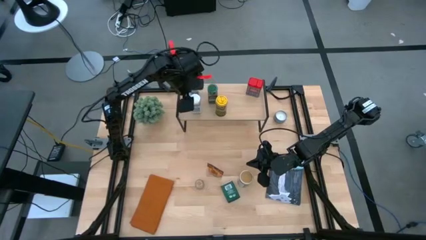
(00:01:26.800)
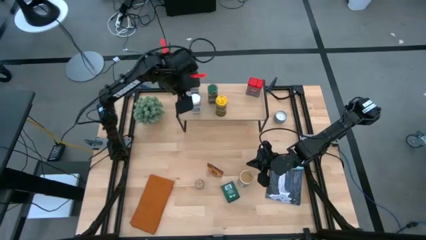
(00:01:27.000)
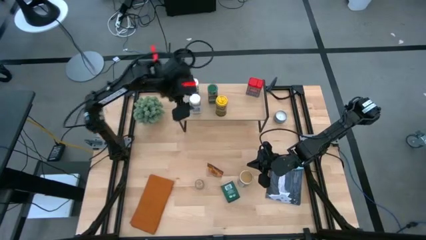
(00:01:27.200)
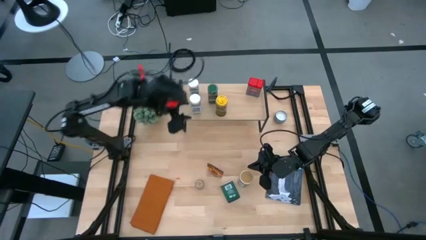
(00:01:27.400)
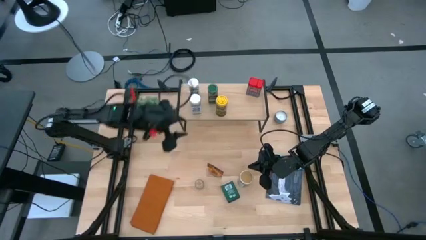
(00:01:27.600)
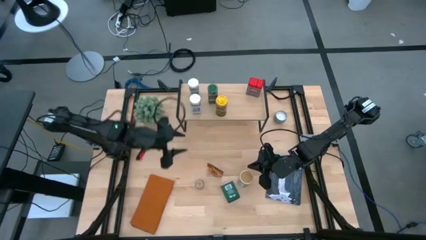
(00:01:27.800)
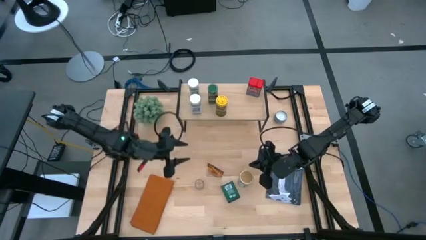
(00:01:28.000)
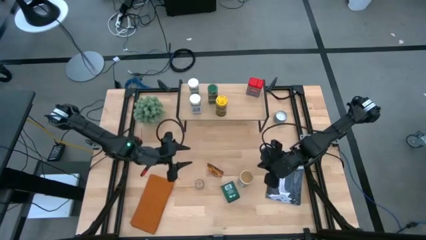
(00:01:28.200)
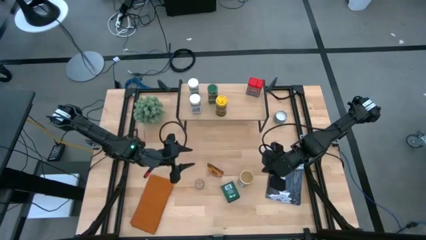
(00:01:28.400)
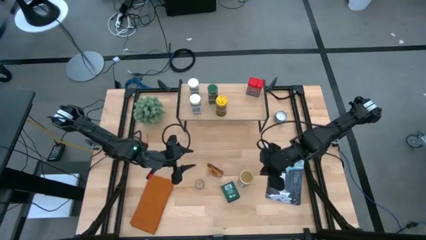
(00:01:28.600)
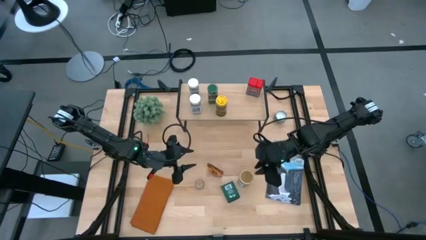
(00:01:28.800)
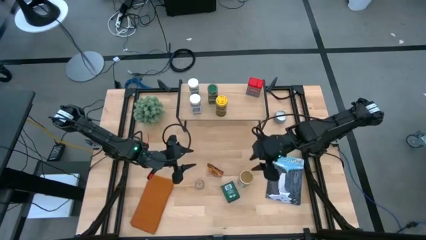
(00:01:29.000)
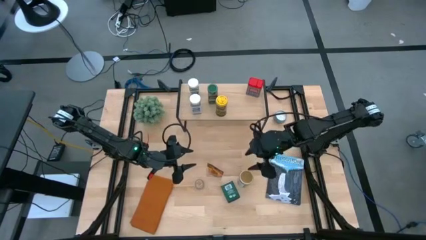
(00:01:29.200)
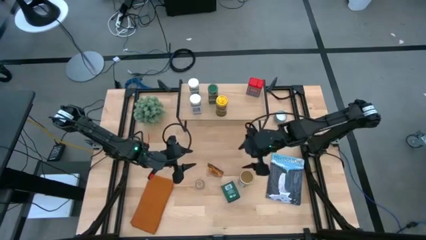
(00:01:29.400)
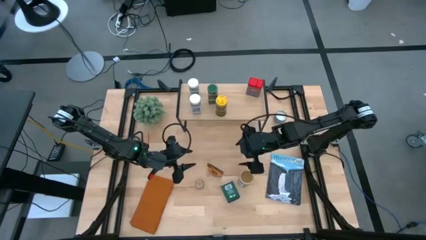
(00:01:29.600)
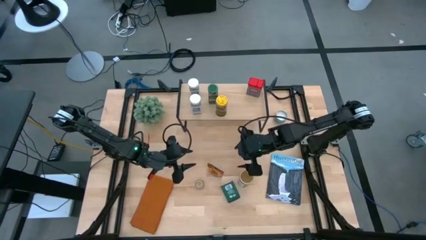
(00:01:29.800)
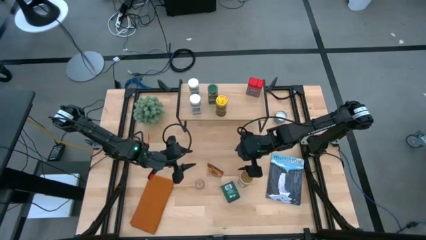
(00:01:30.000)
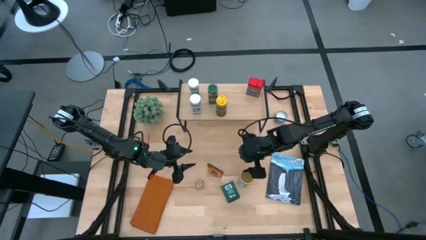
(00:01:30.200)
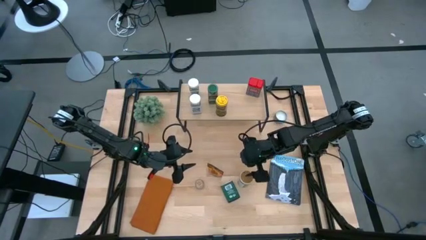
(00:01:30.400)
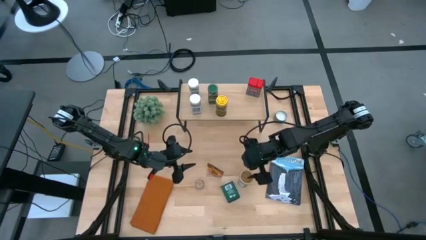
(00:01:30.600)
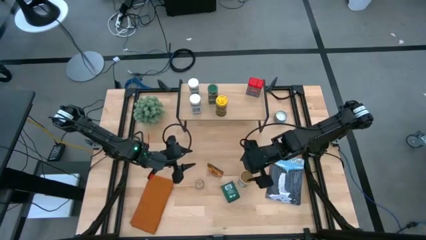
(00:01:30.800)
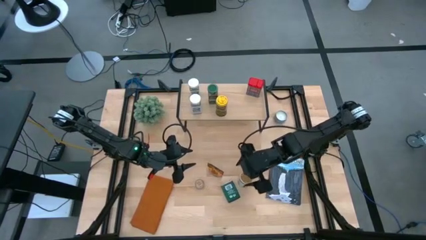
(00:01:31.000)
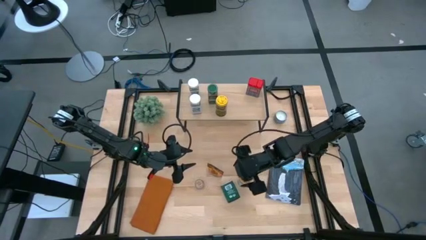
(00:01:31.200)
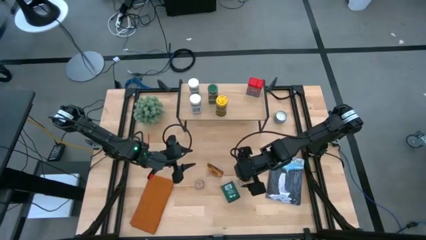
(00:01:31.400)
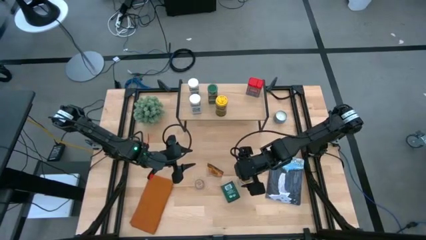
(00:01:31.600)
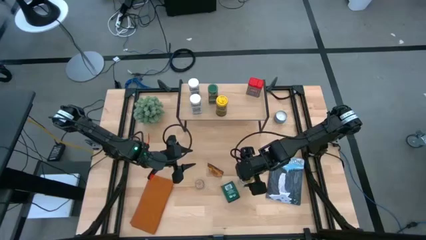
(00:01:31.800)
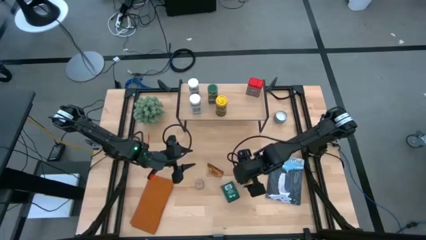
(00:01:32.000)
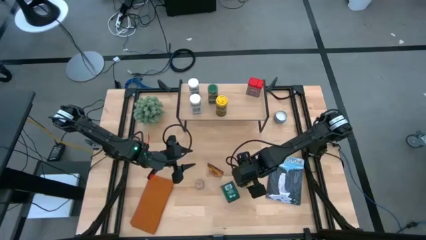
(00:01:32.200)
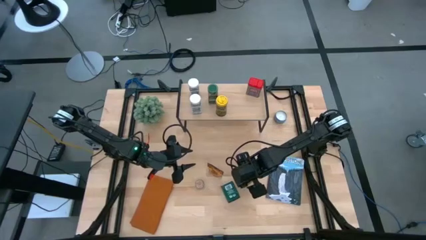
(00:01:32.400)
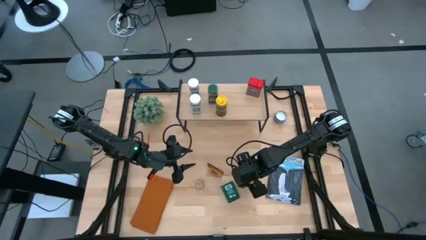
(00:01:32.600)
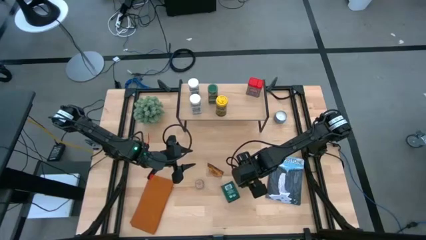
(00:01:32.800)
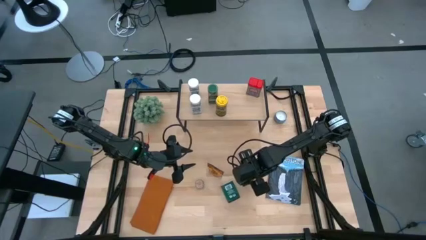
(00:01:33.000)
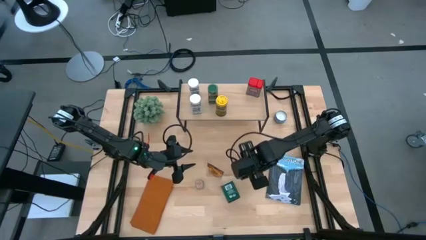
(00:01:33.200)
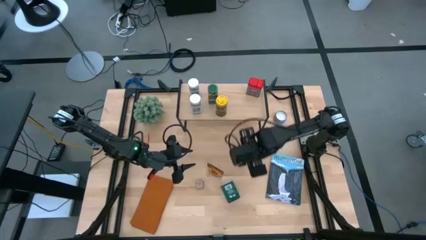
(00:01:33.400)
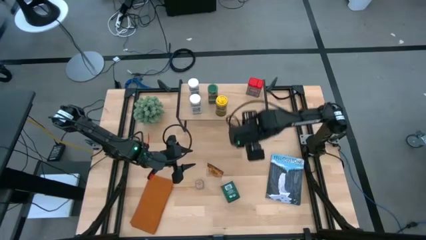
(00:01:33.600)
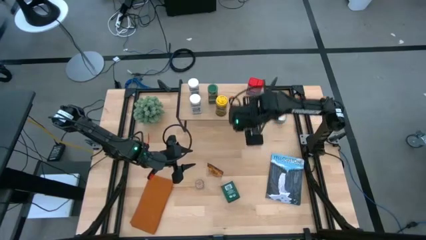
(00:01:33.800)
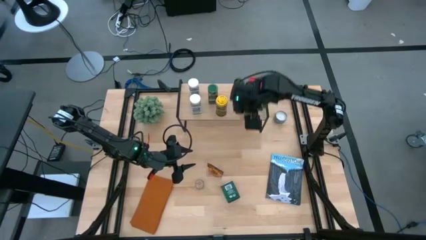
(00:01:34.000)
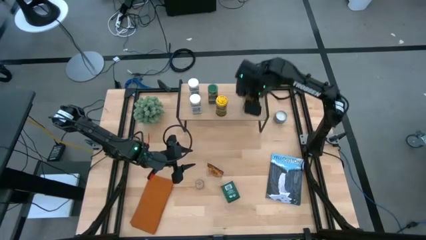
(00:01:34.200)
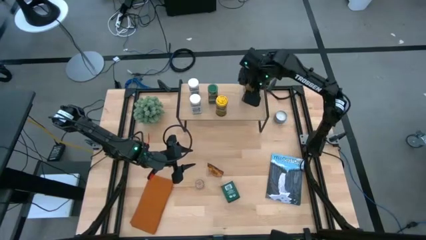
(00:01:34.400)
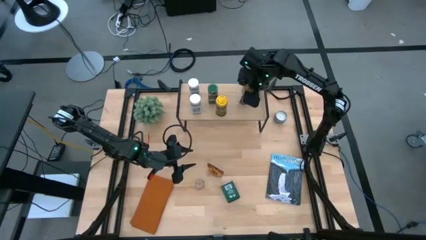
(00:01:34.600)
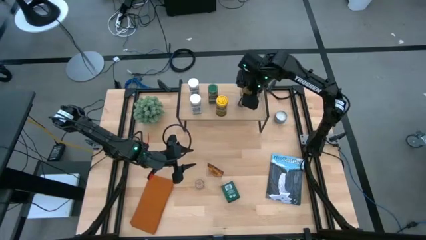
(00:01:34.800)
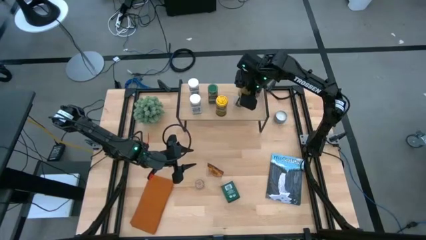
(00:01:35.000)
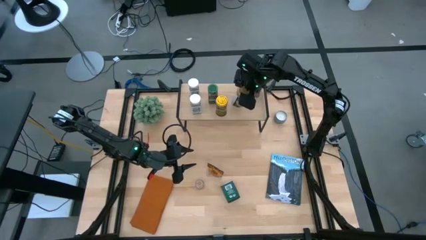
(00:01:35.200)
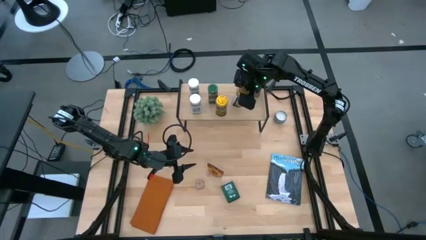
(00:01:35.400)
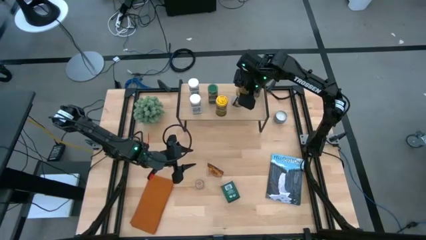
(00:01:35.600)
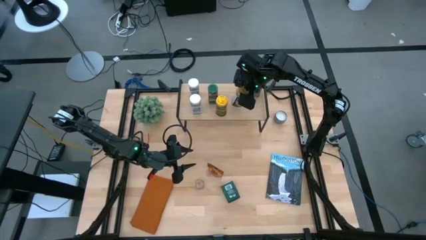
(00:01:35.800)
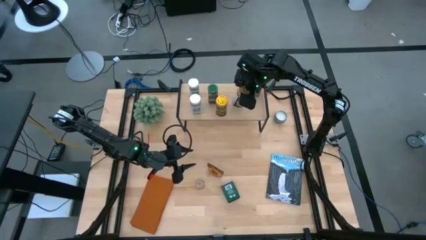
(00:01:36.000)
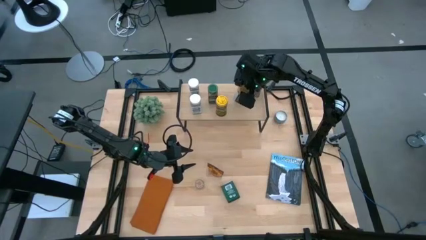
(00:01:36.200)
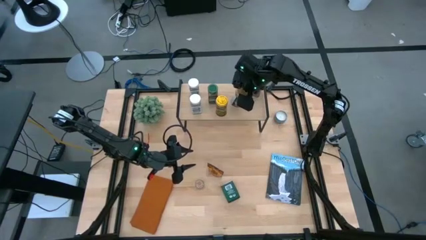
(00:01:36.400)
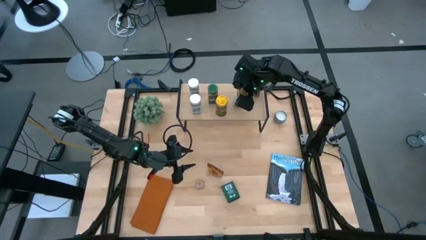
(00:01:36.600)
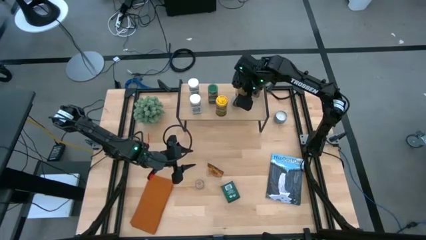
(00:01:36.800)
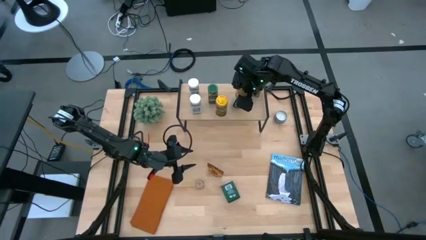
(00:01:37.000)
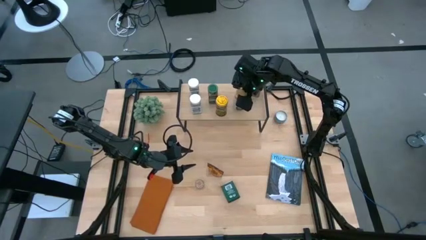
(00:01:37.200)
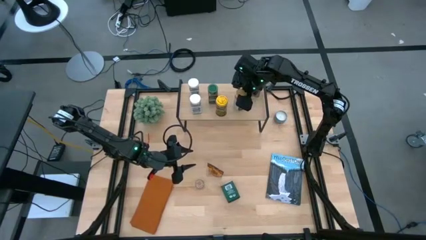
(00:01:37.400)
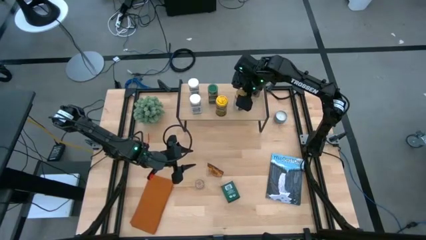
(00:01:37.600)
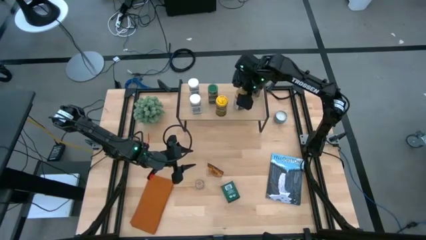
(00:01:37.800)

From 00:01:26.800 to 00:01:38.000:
Task: Shelf spices
Put the gold seasoning bottle on the shelf
